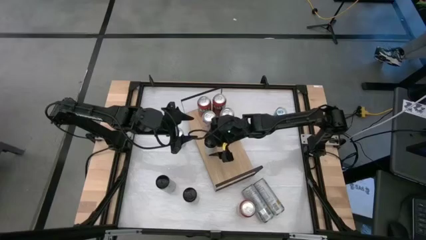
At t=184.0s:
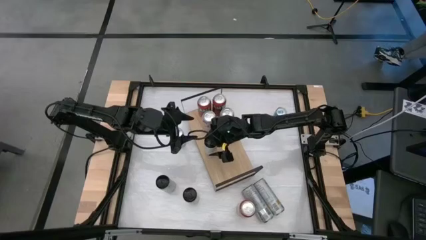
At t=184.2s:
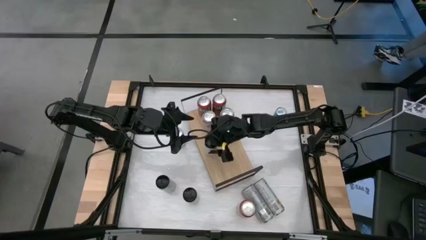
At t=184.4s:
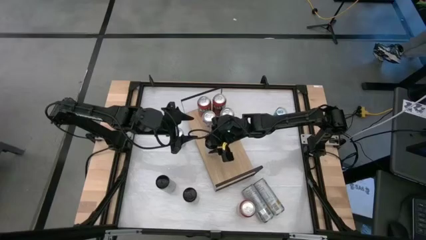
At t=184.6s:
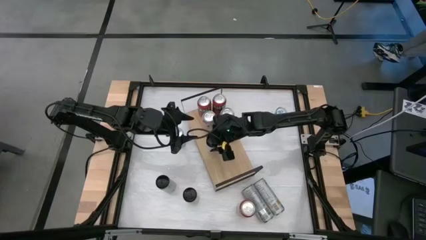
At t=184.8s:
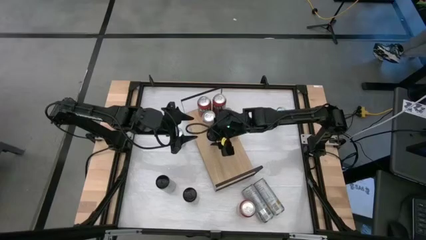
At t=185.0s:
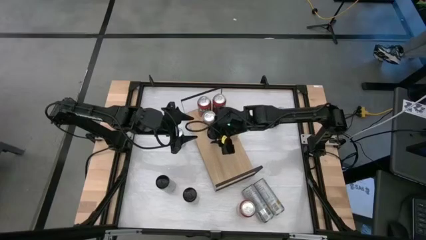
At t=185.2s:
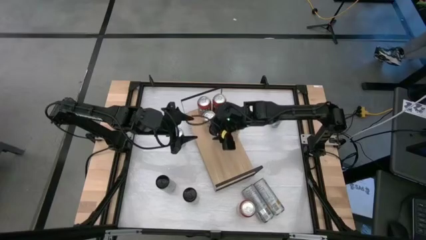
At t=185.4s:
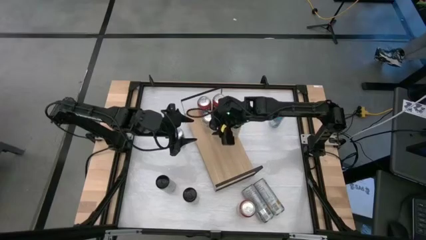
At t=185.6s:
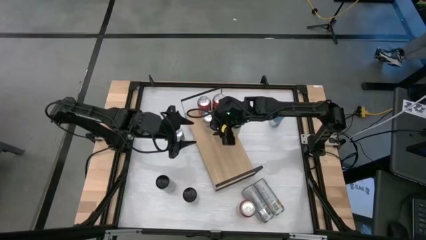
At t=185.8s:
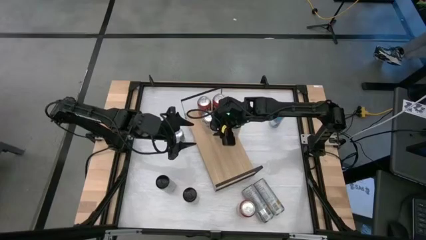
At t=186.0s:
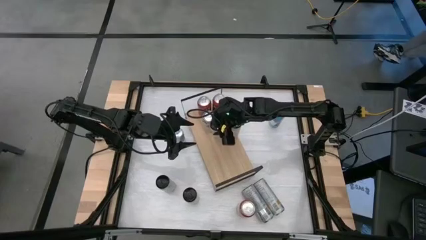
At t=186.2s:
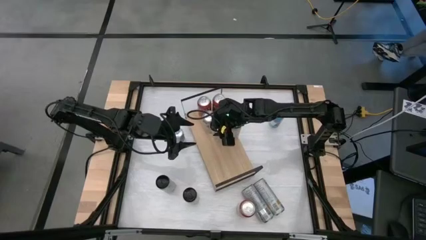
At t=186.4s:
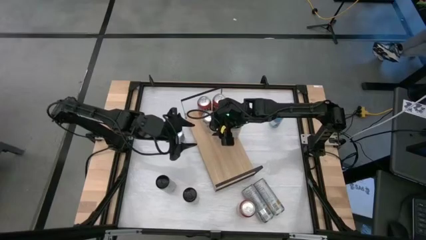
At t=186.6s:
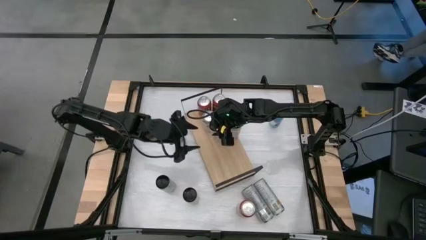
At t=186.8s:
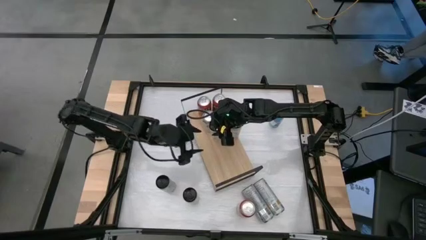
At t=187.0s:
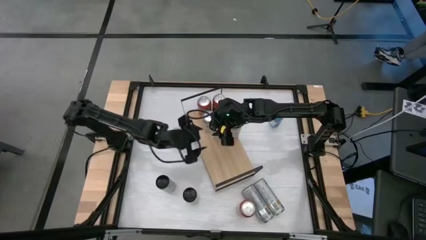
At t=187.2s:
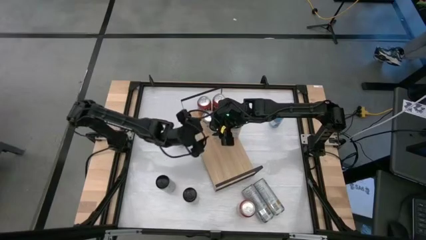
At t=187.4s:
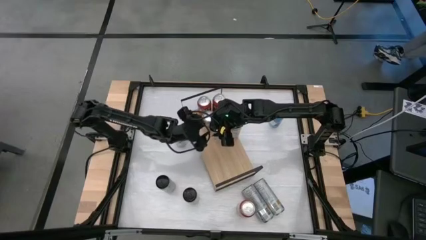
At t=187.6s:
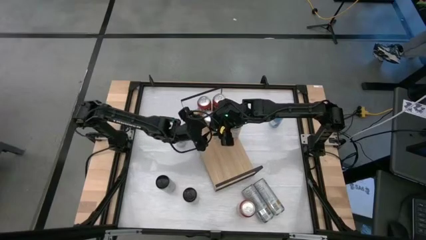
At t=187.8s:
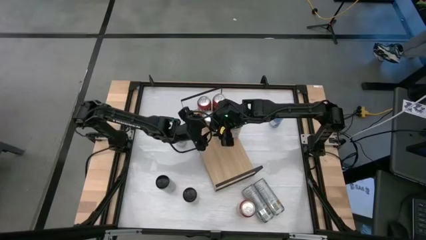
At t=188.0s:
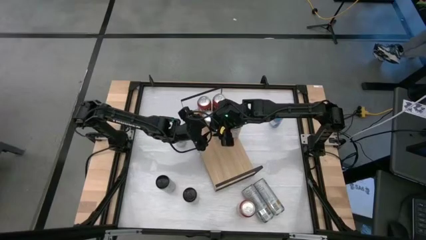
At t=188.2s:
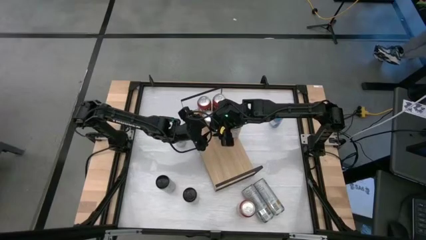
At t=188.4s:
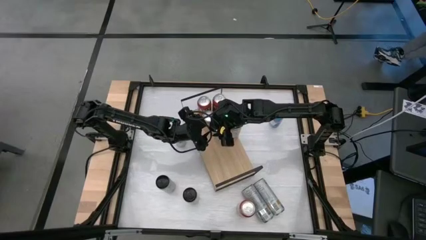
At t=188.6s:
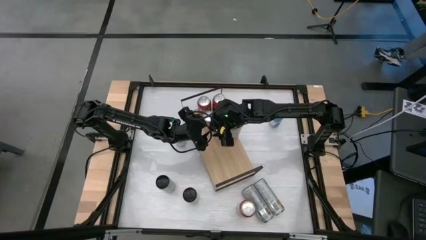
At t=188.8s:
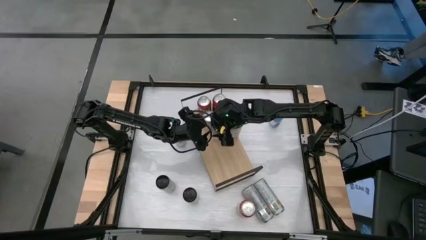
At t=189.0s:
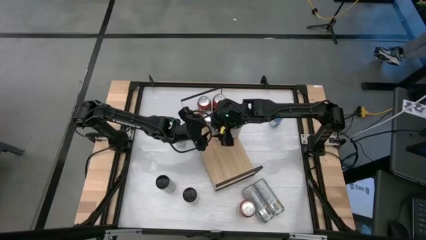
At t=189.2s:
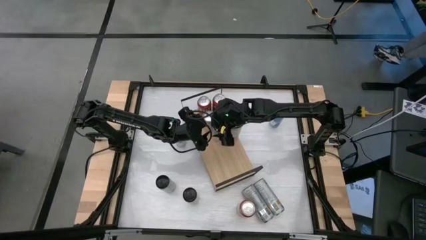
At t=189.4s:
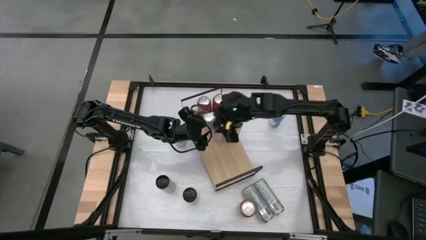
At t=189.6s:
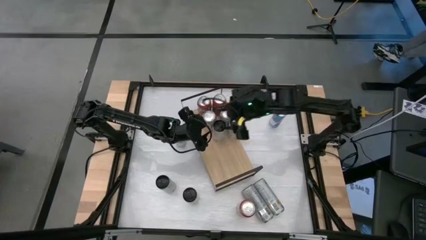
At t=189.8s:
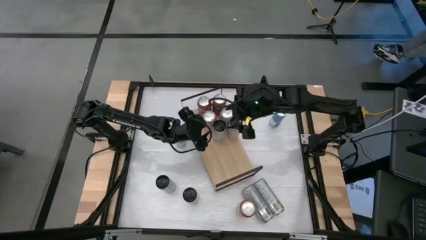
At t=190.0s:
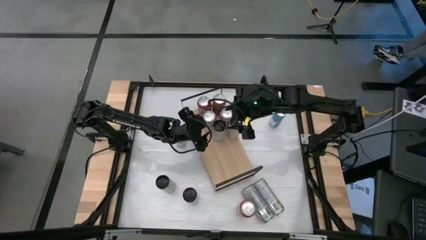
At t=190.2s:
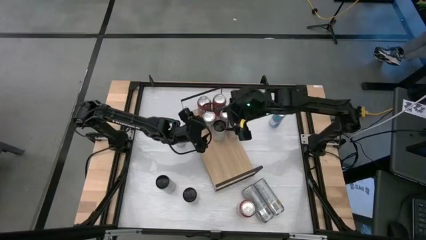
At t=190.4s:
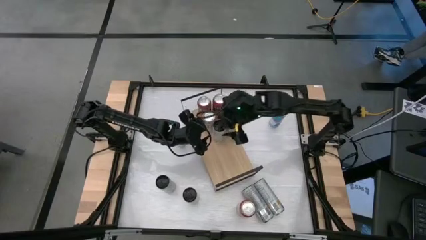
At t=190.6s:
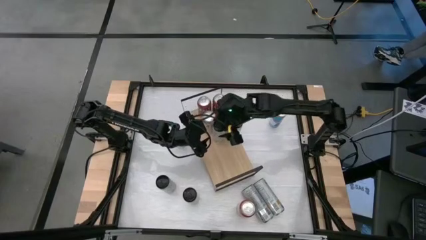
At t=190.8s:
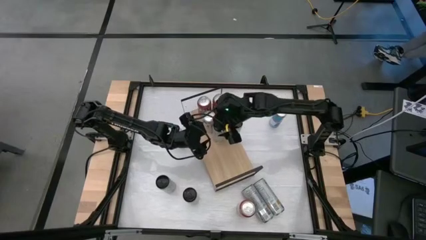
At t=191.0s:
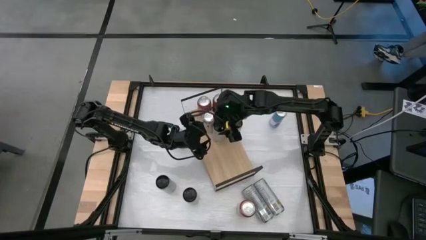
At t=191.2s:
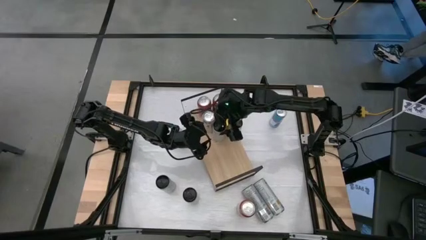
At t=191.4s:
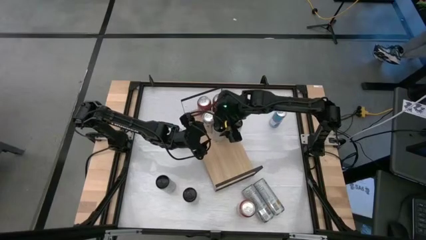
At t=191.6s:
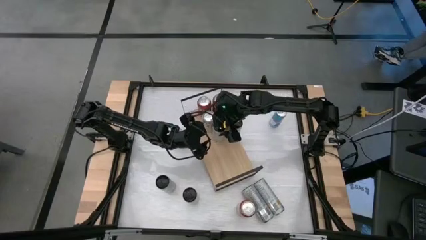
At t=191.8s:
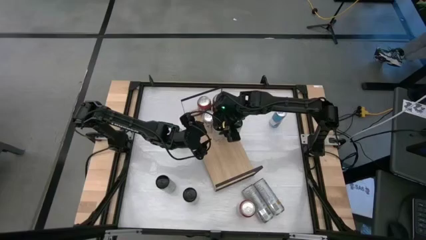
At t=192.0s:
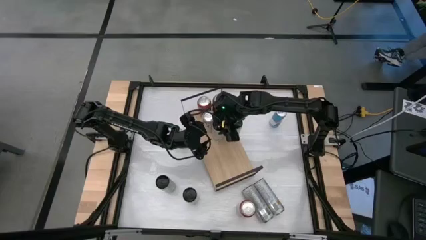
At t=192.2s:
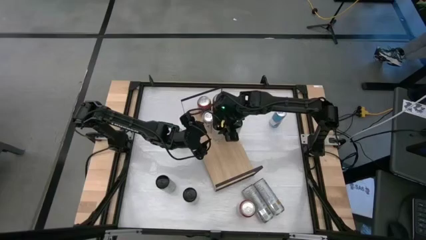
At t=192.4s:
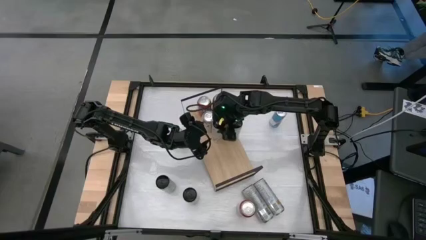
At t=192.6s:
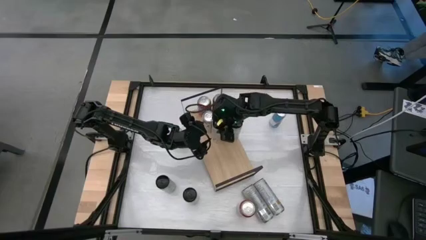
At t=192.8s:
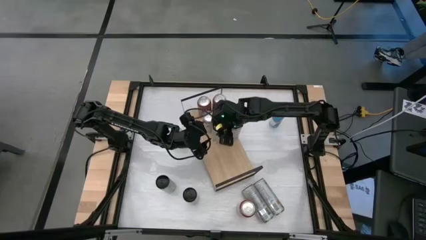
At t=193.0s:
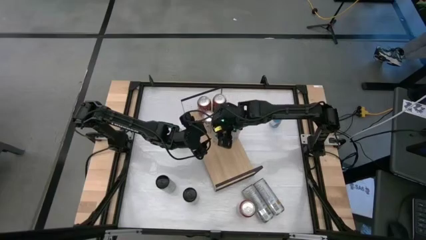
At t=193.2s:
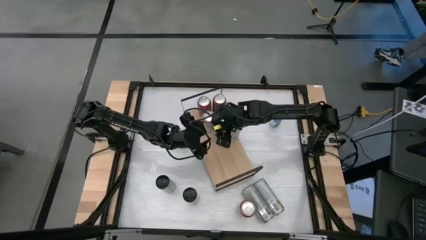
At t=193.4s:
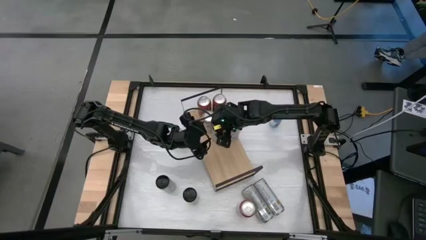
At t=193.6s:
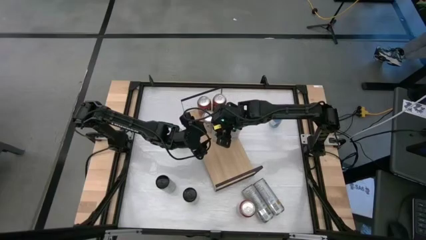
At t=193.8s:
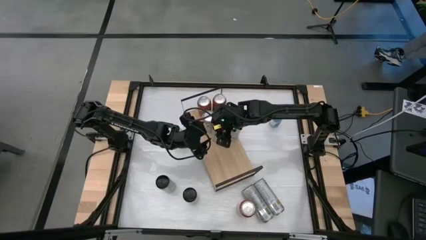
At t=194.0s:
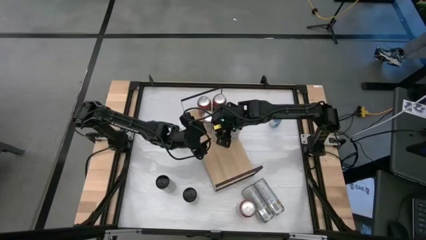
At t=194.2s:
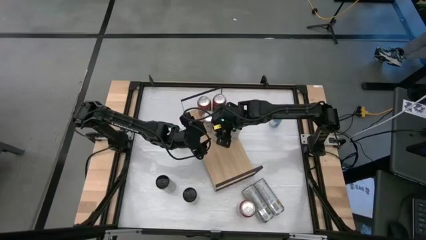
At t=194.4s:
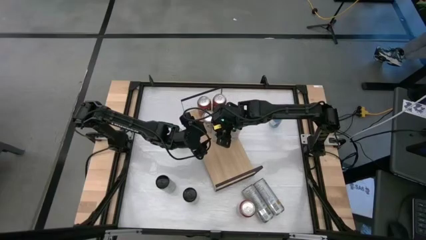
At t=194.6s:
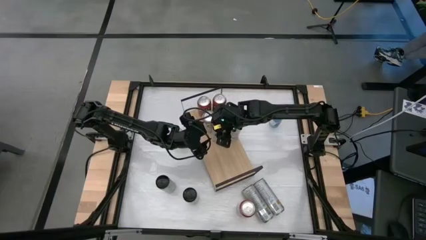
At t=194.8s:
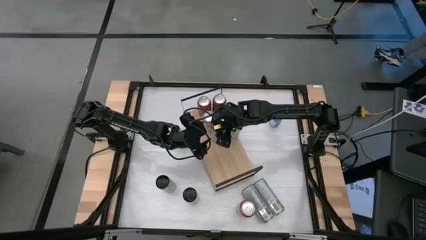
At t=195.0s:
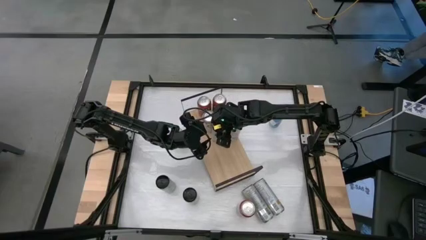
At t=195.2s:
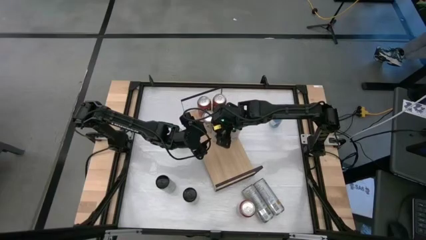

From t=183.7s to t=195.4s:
Task: Place canned beverage on shelf
Align the yellow soda can with the other yellow soda can

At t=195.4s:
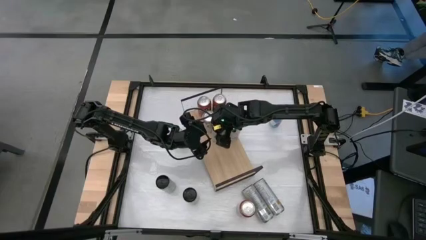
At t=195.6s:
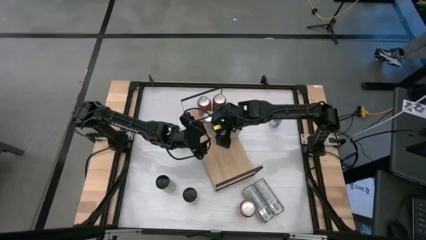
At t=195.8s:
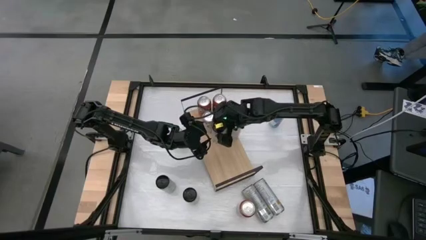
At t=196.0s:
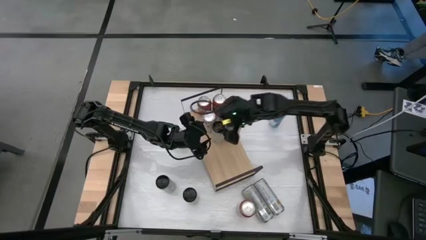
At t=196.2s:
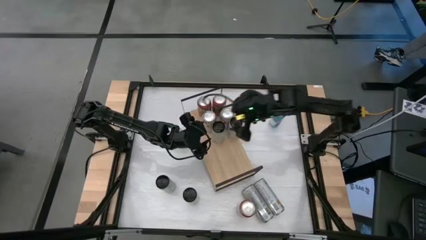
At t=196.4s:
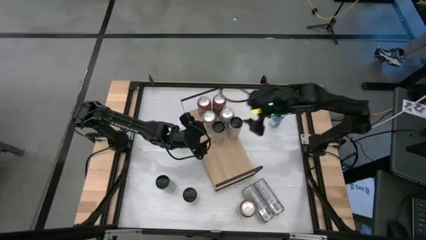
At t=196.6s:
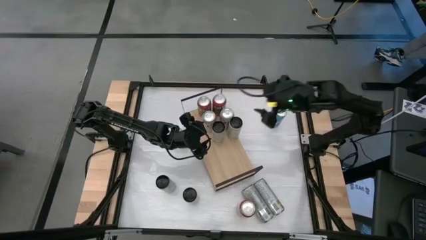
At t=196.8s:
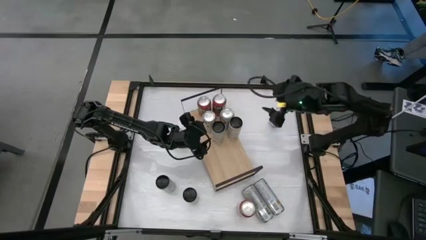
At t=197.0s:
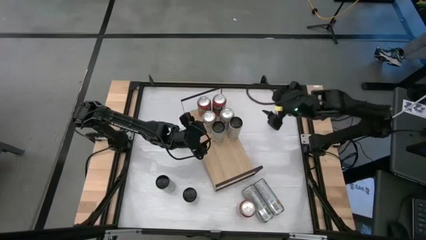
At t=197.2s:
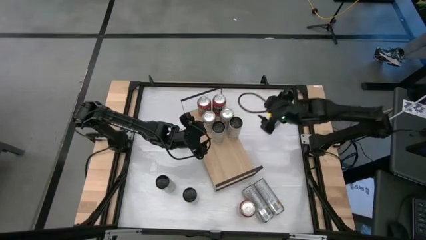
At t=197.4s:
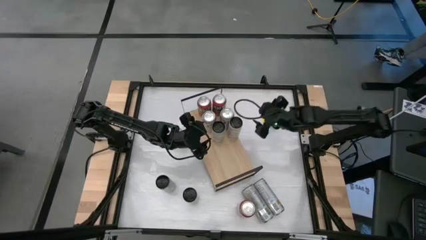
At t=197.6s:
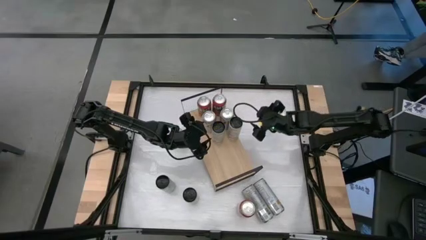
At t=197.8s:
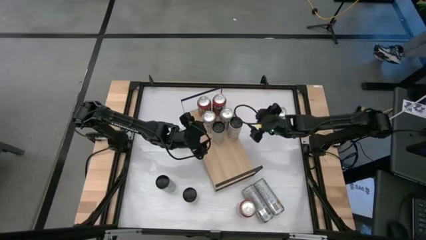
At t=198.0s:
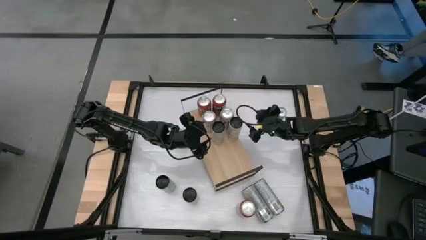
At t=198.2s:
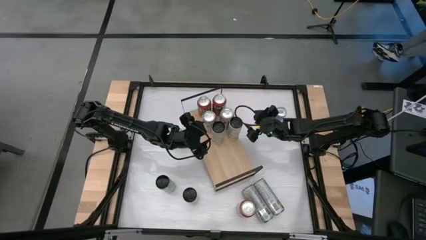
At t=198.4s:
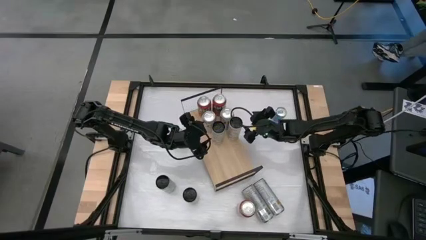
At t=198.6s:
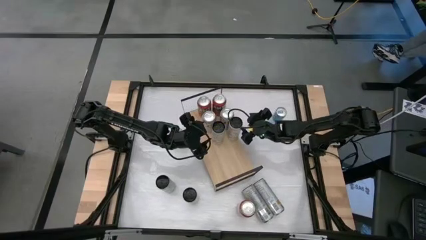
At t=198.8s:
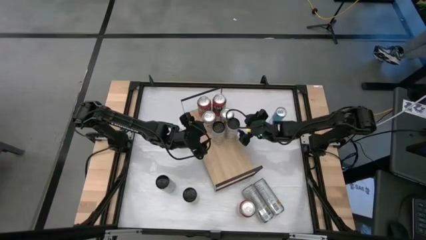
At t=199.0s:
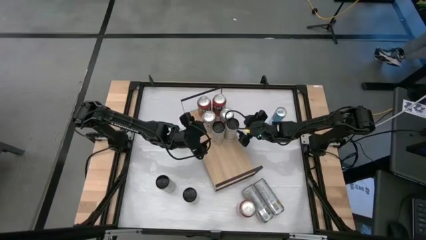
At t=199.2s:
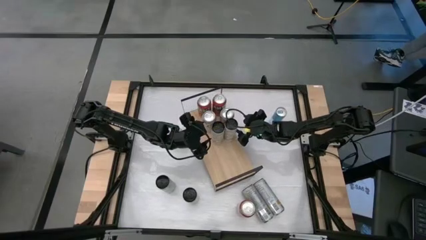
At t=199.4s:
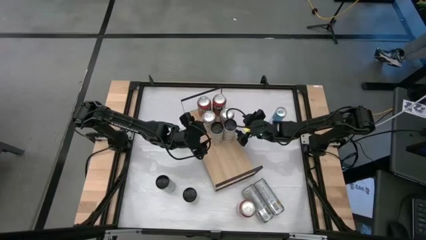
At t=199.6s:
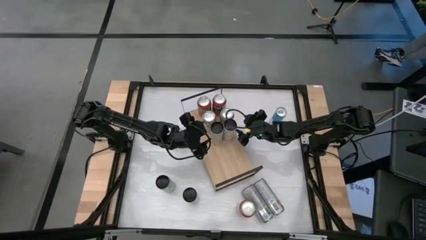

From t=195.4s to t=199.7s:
Adjust the yellow can on the shelf
